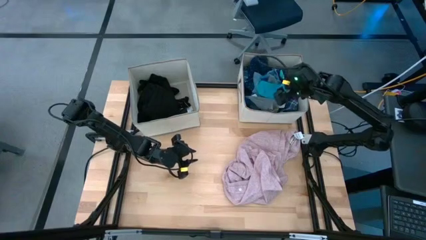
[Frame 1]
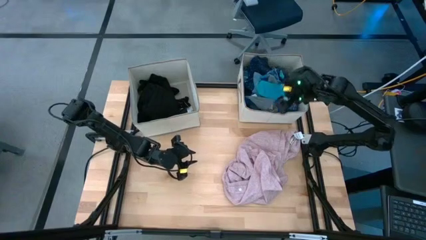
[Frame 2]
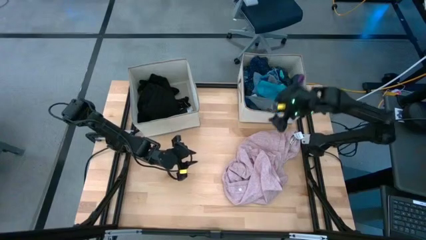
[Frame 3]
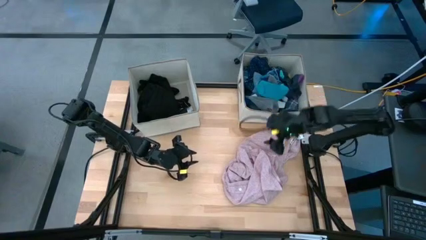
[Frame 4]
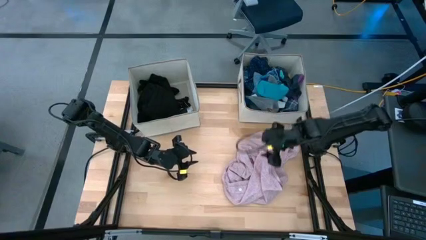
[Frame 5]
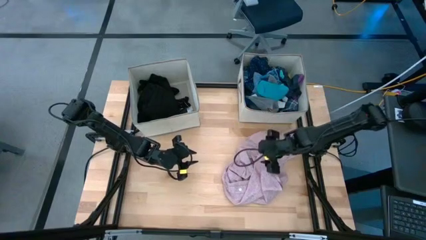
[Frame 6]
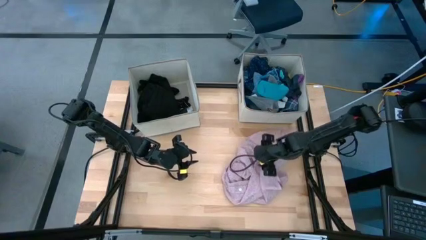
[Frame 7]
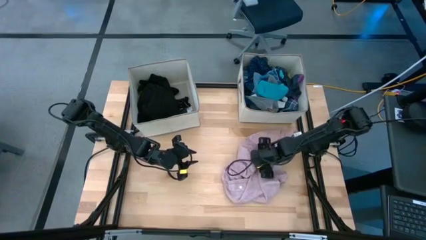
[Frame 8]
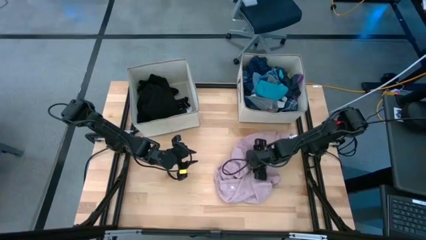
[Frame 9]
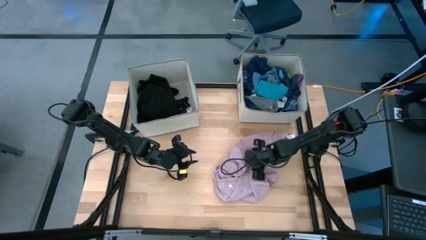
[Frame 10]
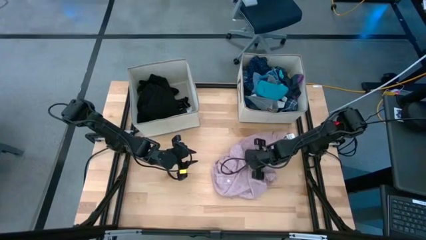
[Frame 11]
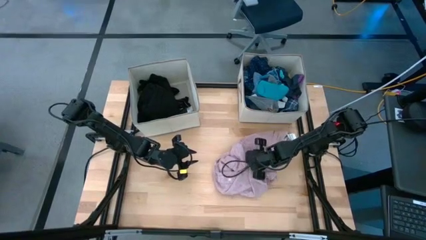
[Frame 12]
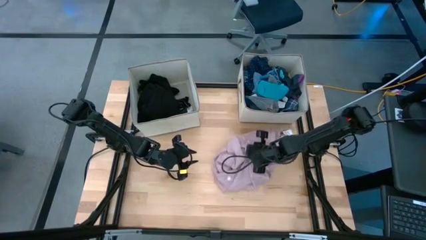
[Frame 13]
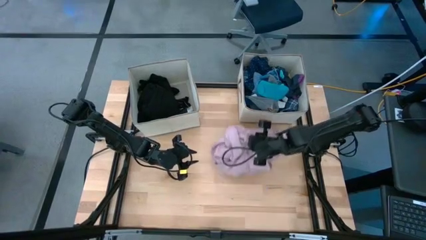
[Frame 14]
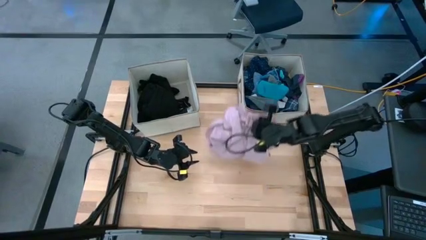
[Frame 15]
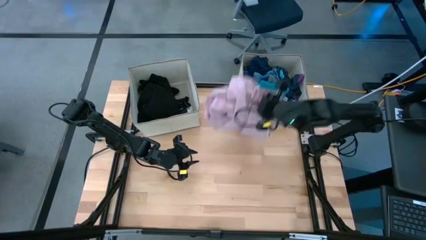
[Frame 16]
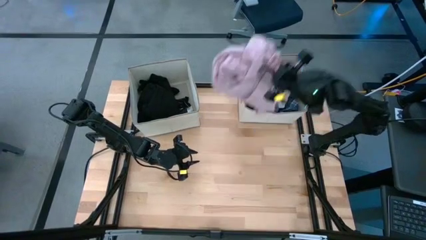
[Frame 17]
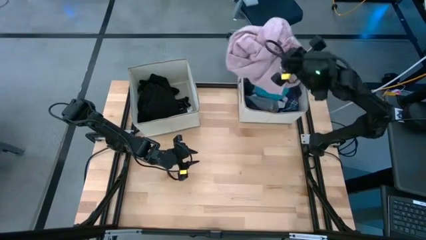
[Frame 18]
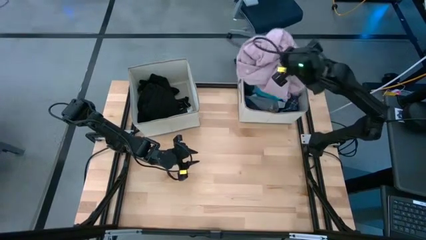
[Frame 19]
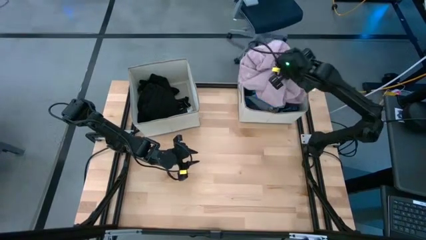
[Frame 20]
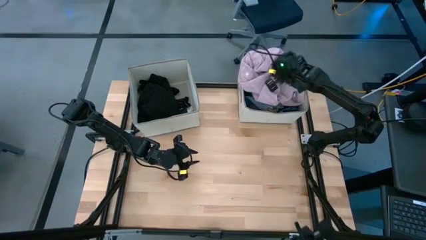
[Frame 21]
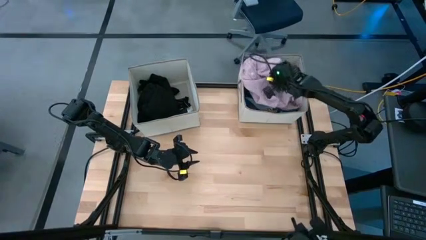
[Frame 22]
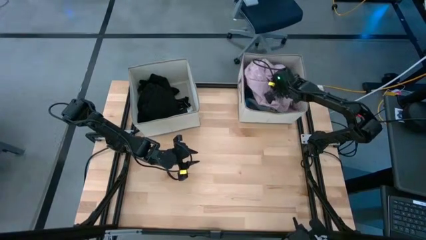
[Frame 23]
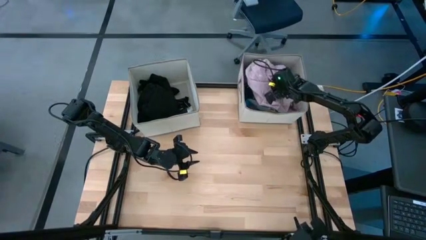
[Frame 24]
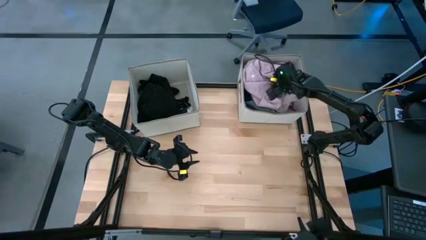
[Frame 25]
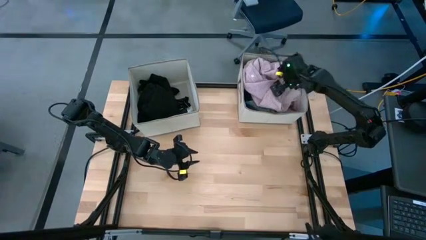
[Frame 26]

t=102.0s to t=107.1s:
Task: Sort clothes
Put the pink polo shirt into the right laundry bin

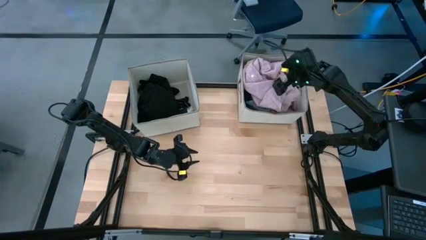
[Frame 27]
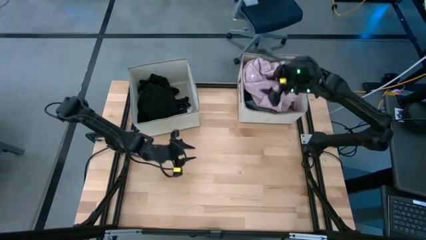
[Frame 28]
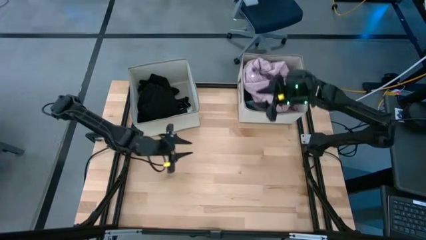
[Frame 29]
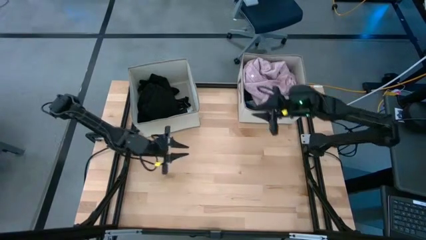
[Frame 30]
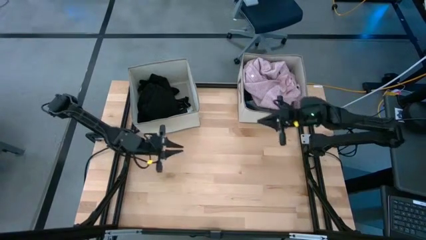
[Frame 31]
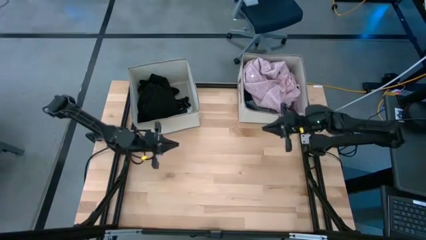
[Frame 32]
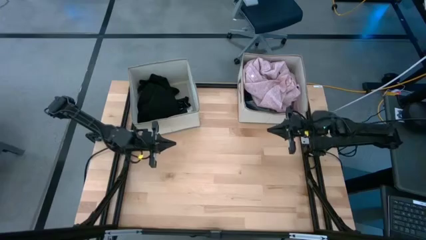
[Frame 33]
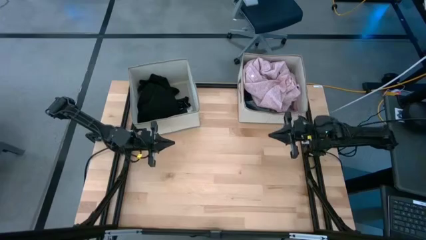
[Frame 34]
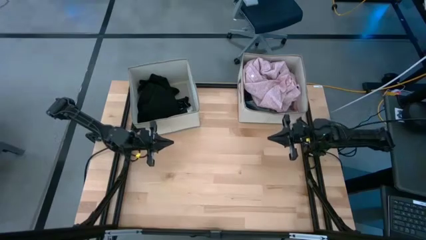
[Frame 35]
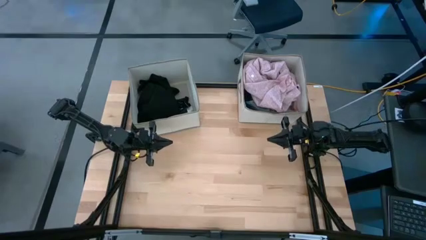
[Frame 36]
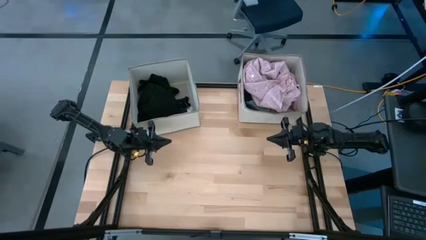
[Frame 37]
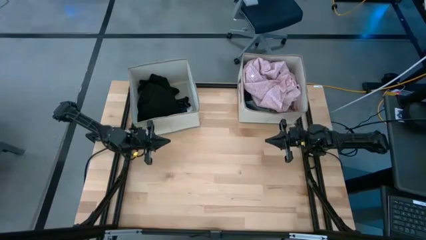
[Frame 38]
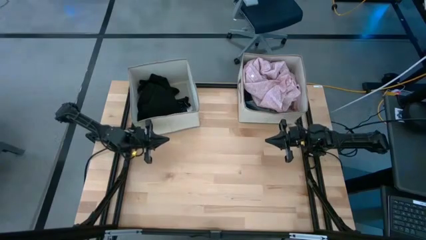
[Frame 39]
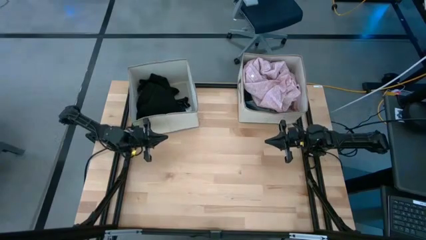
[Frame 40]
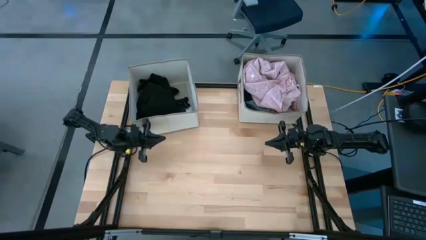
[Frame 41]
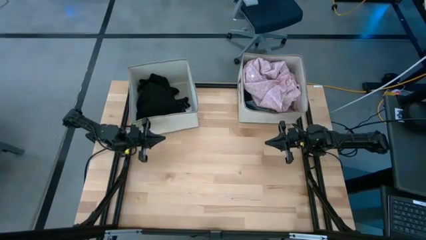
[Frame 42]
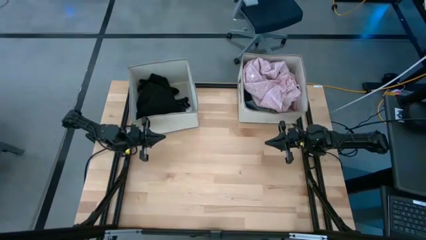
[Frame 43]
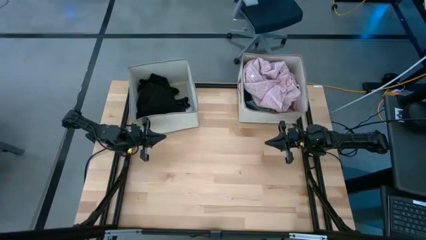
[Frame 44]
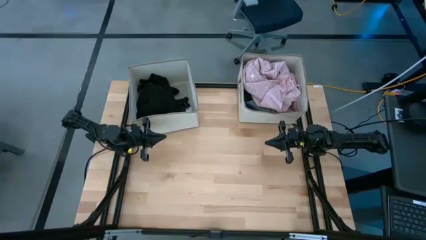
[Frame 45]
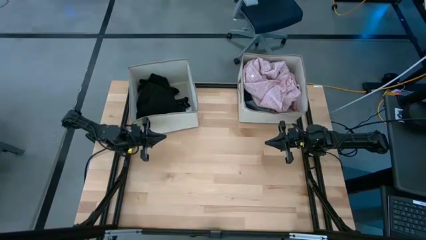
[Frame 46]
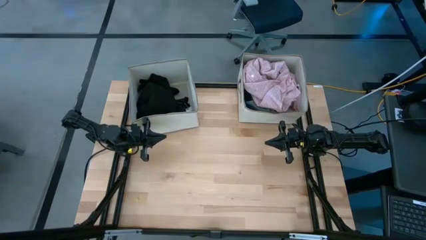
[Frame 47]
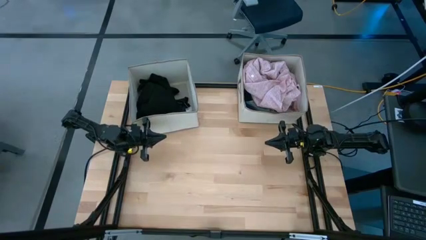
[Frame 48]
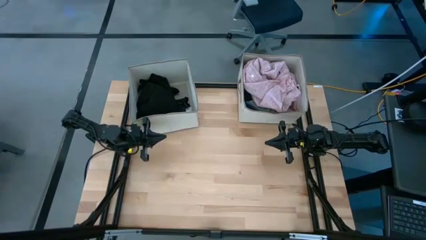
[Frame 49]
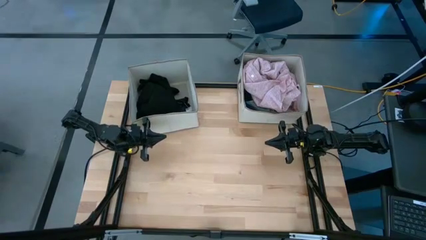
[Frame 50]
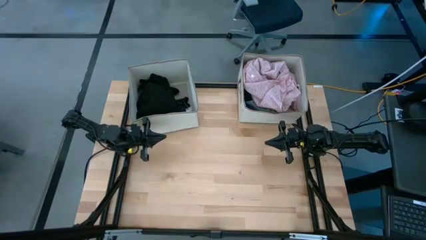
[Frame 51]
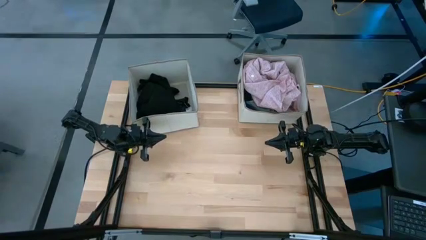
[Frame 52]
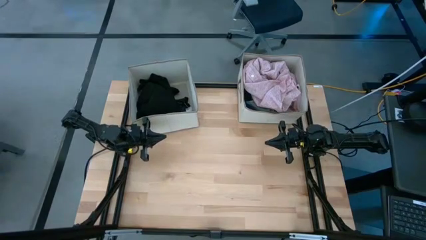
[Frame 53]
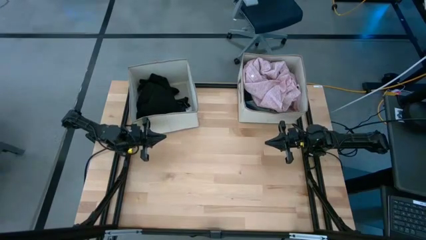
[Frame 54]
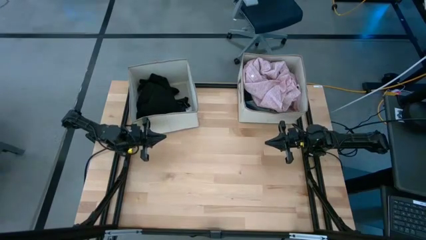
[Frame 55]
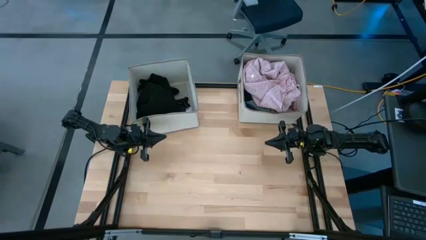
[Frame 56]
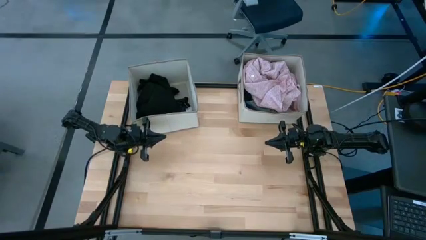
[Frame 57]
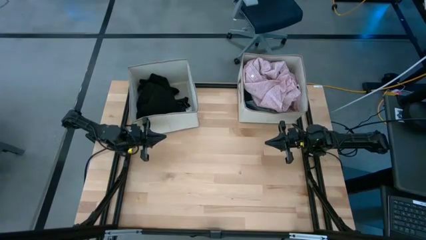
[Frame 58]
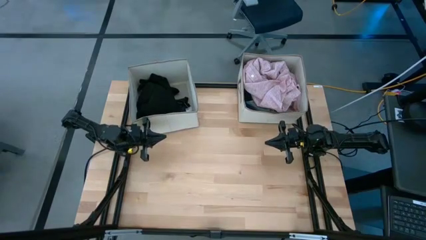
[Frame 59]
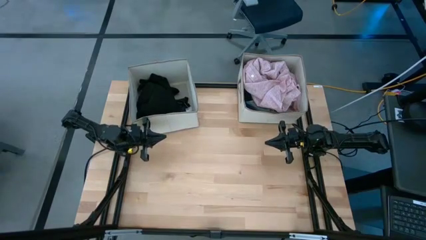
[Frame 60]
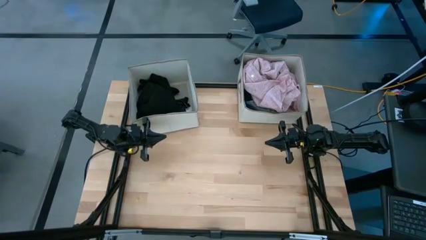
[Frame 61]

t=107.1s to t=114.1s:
Return to Home Position
